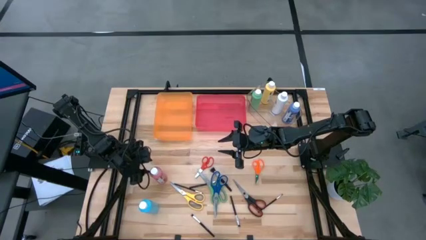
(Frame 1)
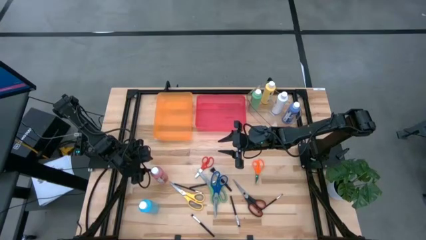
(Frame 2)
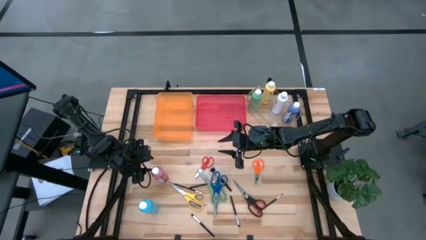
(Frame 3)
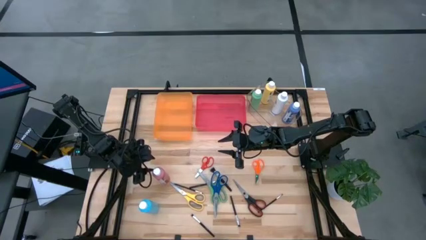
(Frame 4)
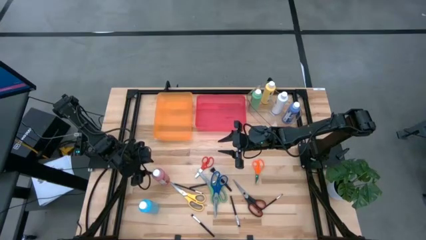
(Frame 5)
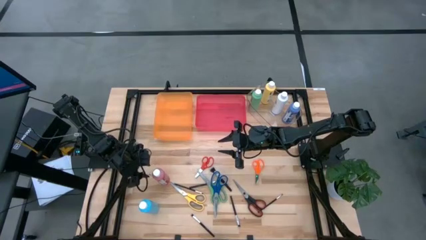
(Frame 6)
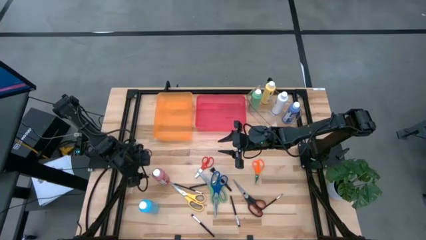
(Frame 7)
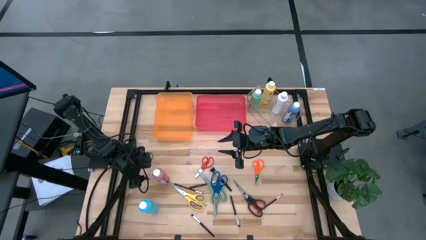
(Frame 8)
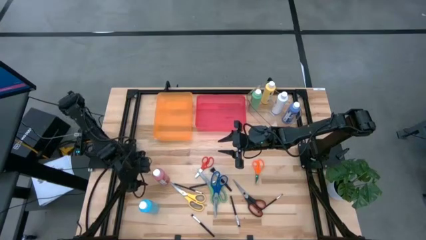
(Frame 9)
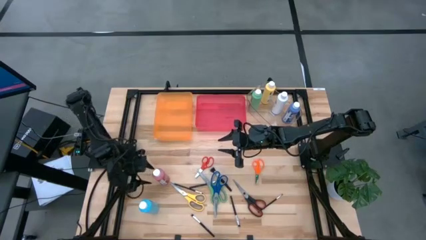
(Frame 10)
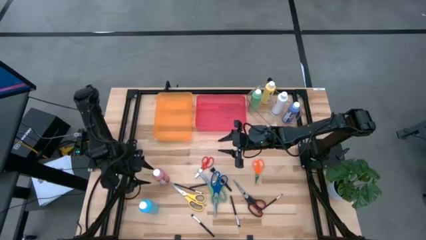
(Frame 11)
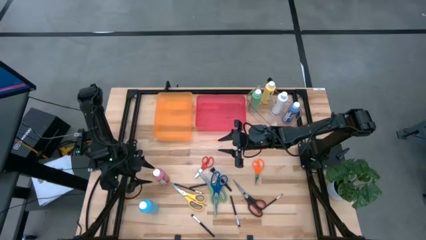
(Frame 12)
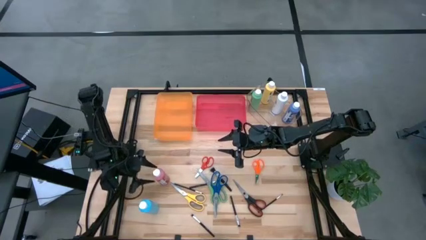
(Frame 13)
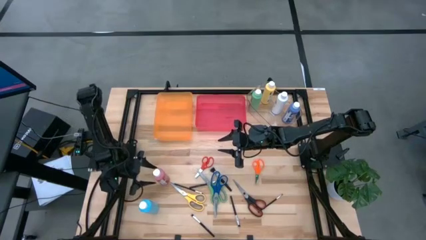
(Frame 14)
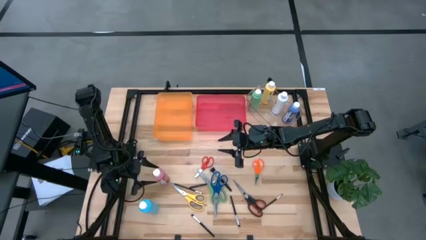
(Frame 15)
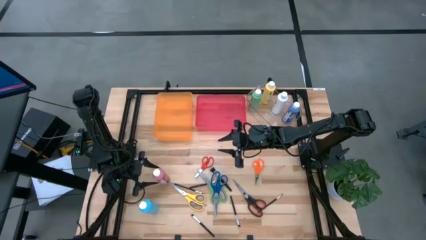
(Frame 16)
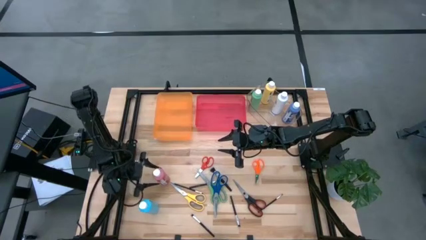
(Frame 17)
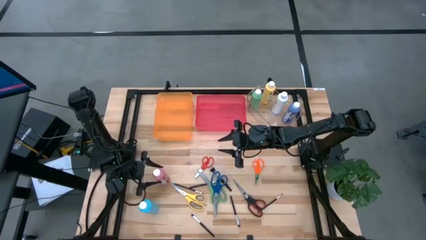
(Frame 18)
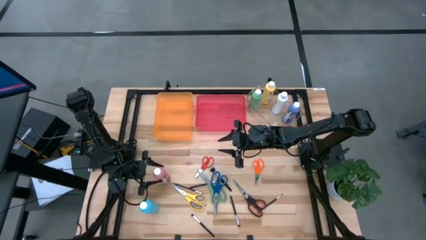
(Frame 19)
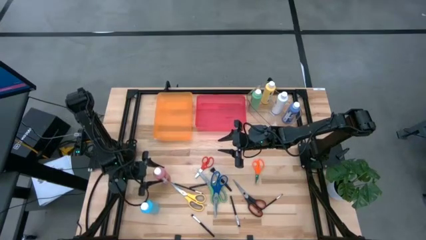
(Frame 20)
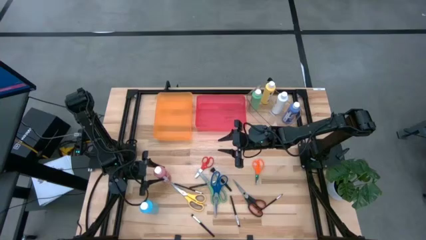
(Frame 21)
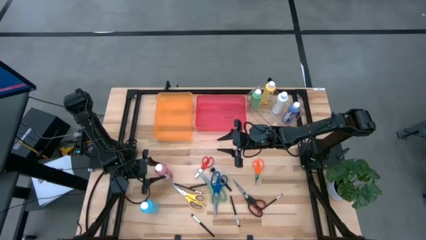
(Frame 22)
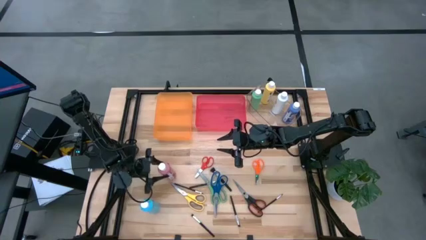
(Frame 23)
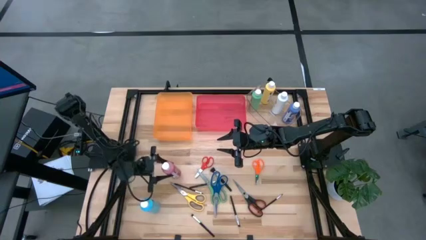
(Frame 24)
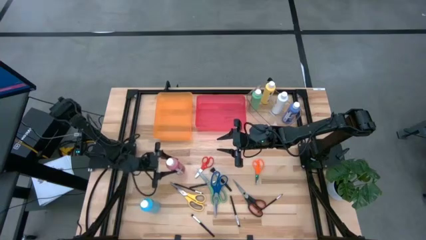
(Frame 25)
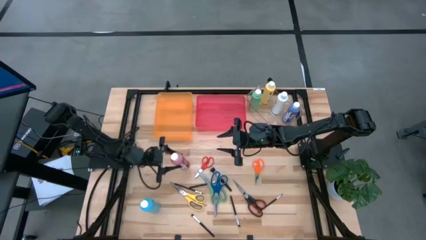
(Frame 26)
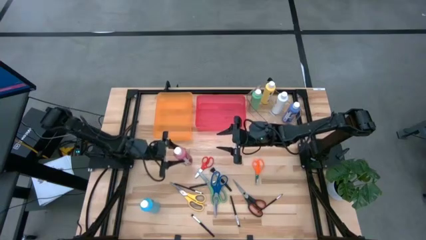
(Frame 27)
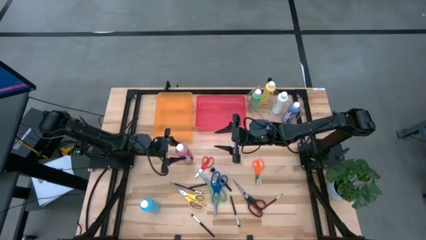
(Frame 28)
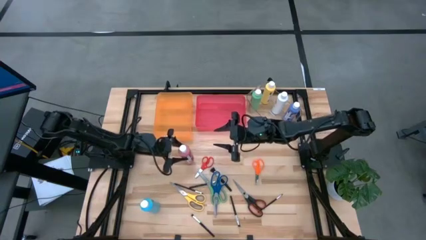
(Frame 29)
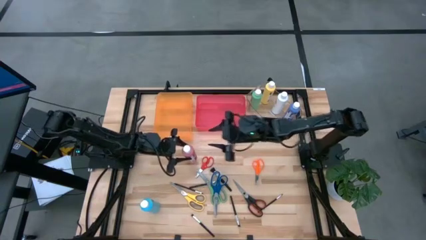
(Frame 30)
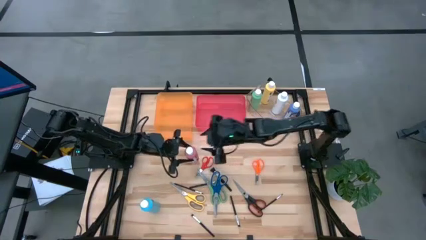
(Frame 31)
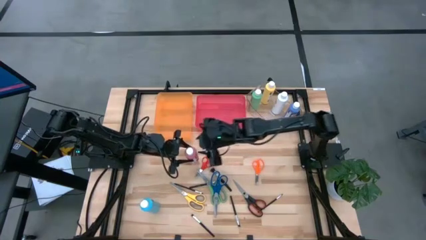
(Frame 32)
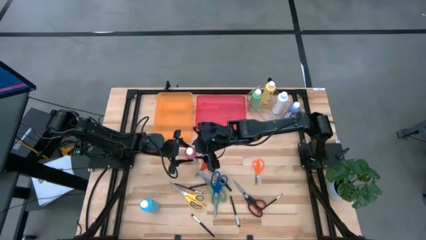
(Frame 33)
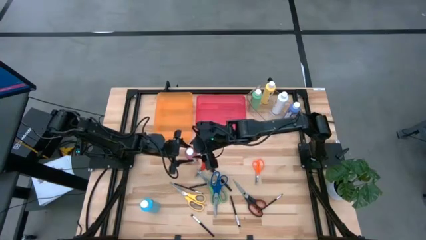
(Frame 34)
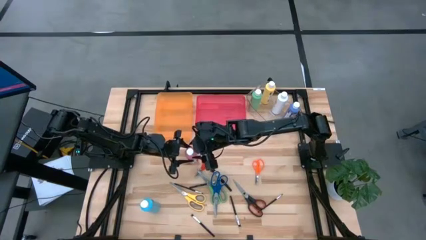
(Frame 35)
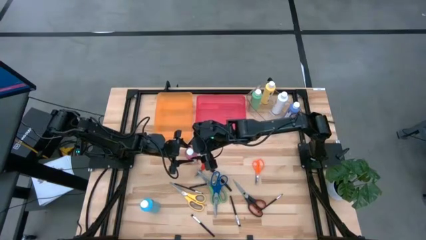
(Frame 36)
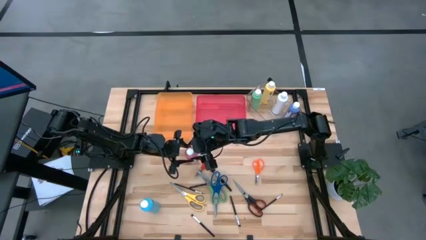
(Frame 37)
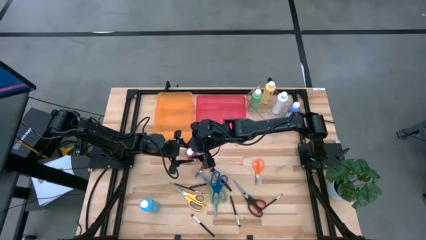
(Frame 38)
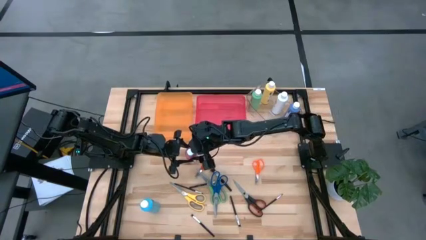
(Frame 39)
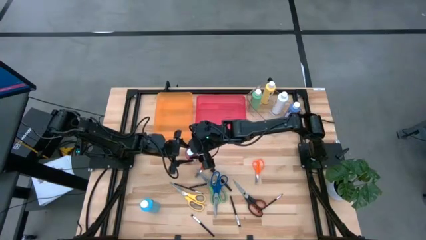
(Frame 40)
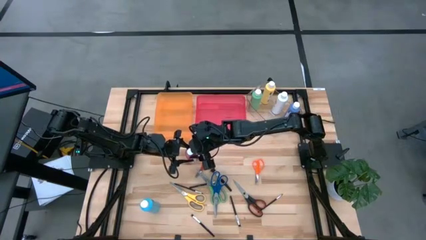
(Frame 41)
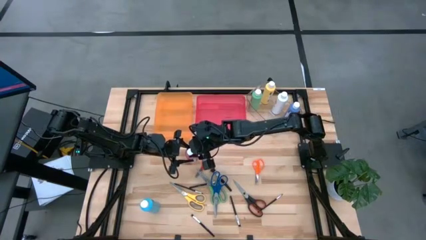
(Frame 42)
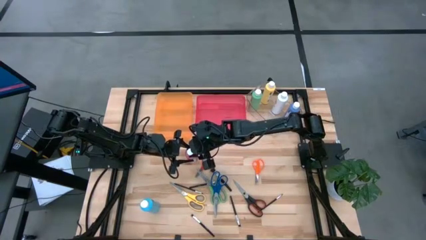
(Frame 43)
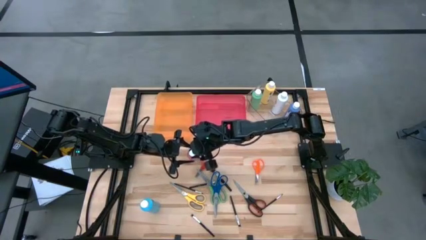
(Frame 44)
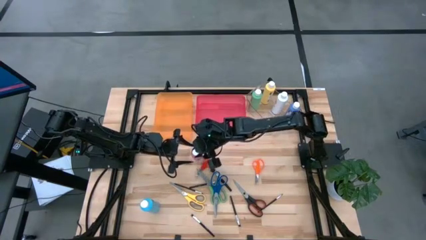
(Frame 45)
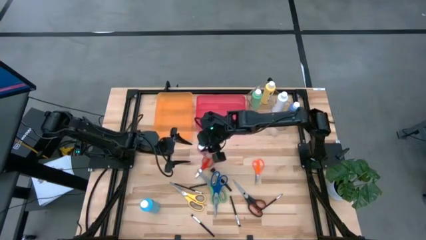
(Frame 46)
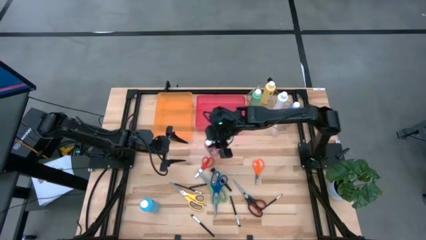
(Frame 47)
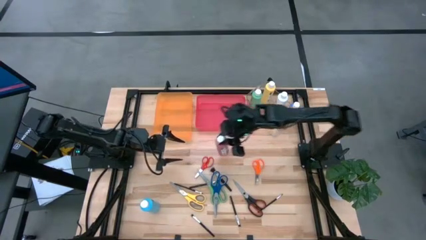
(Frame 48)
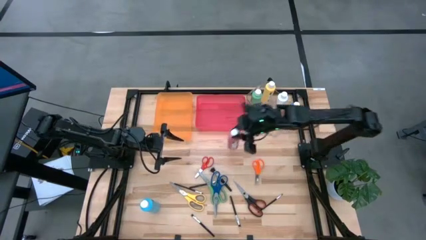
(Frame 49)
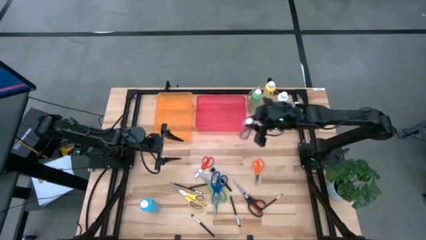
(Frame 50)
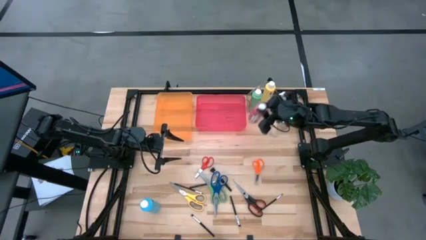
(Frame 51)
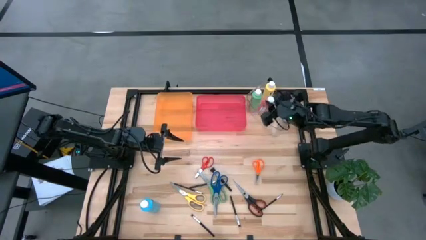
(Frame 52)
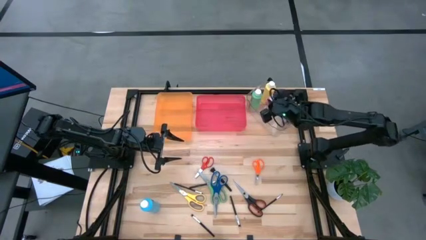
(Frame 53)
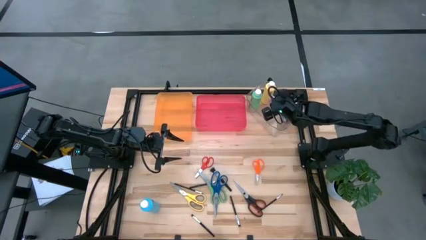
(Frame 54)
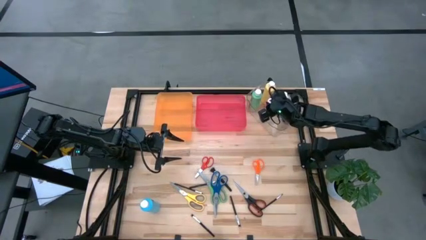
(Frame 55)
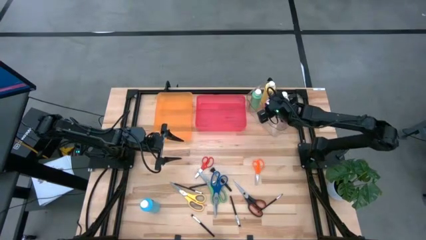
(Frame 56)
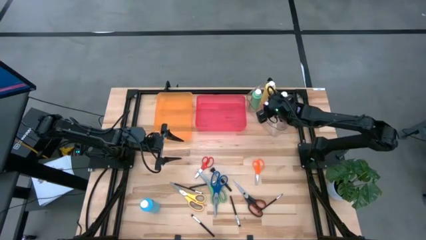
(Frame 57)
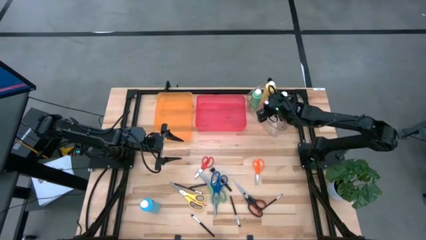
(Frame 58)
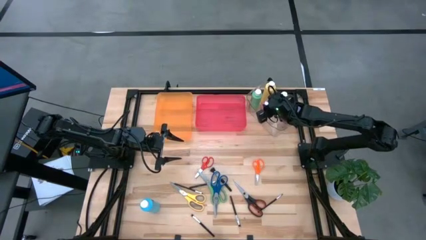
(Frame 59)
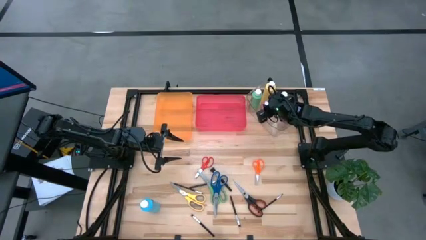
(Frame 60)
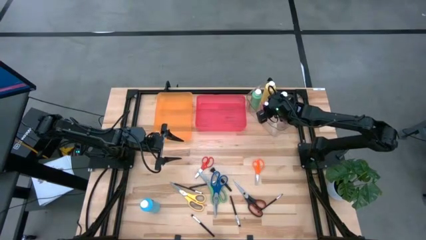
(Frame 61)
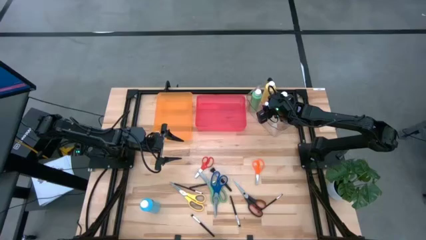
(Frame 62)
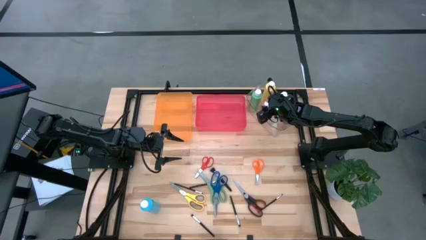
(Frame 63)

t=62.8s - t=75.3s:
Task: Pick & Place Paint Supplies
Put the pink paint bottle into the transparent bin

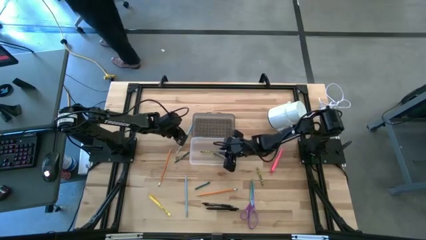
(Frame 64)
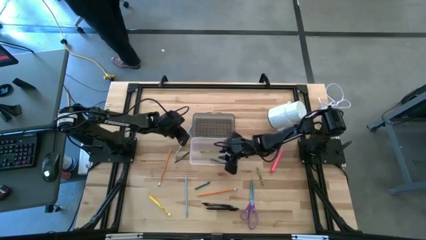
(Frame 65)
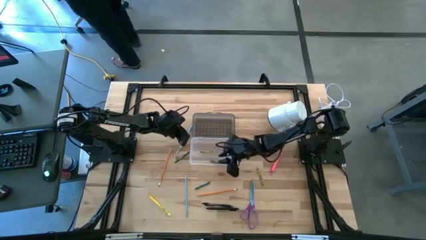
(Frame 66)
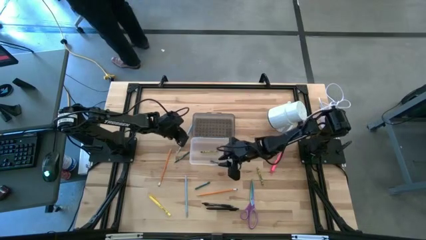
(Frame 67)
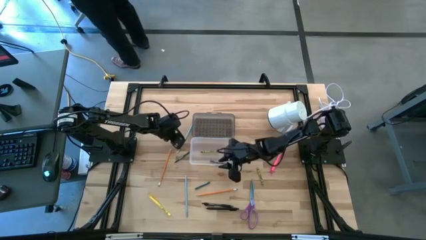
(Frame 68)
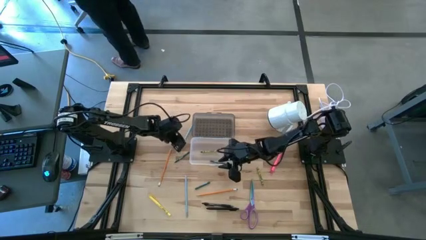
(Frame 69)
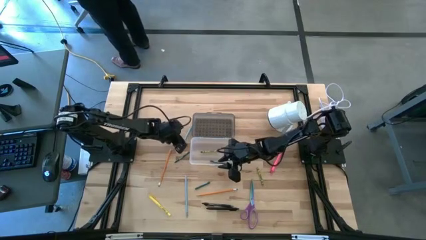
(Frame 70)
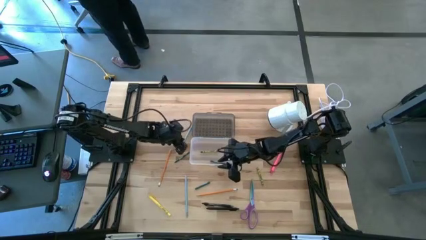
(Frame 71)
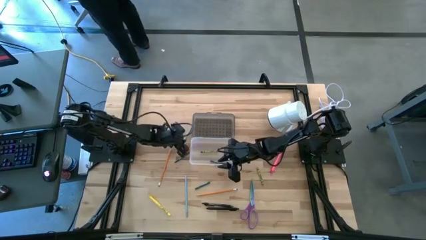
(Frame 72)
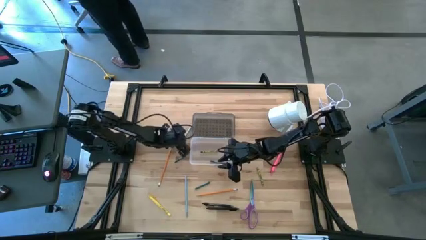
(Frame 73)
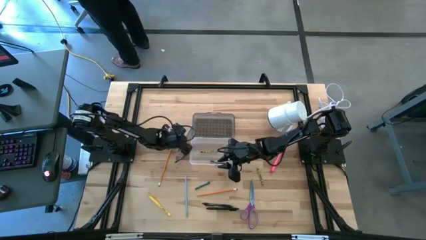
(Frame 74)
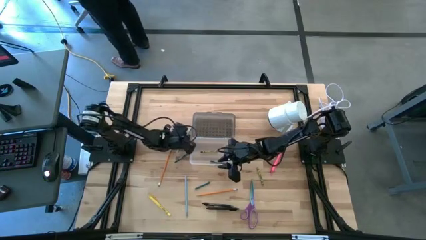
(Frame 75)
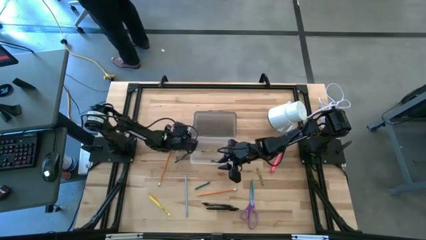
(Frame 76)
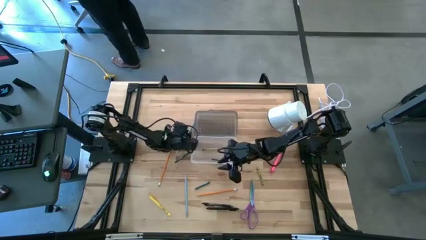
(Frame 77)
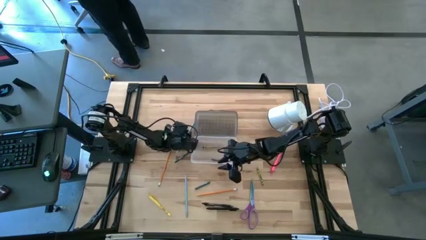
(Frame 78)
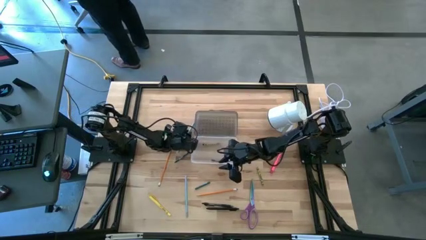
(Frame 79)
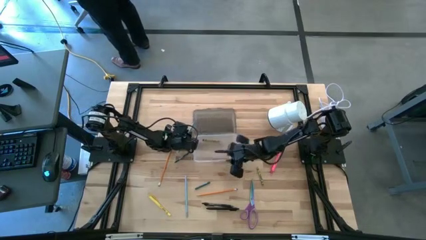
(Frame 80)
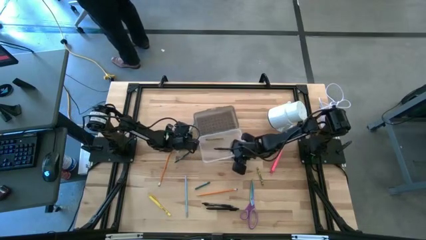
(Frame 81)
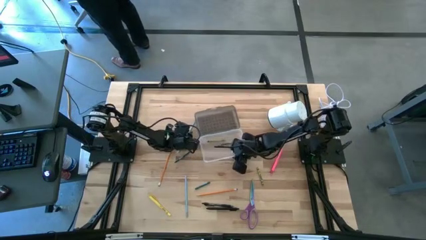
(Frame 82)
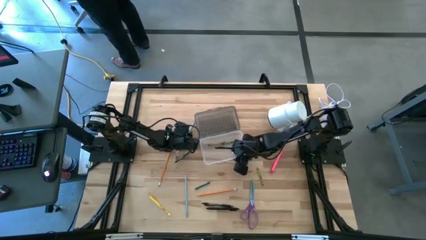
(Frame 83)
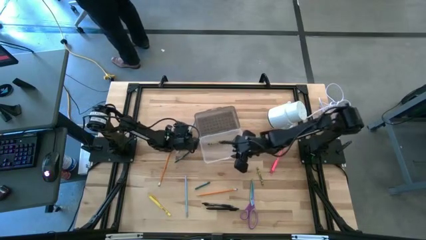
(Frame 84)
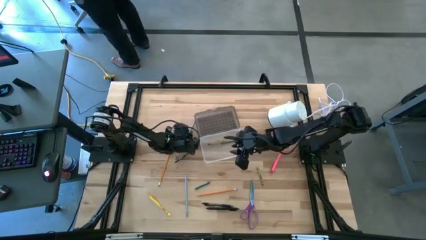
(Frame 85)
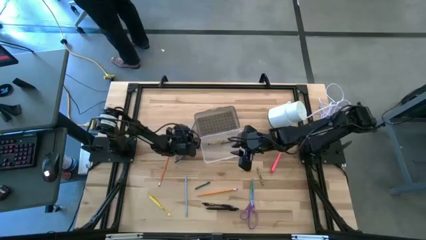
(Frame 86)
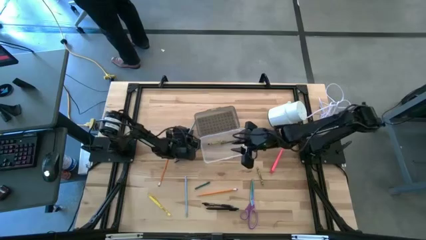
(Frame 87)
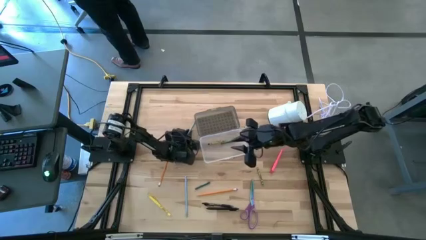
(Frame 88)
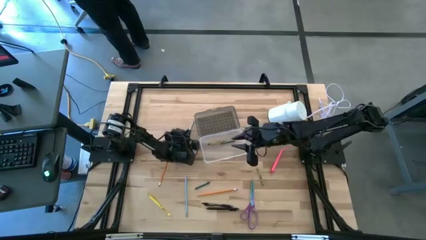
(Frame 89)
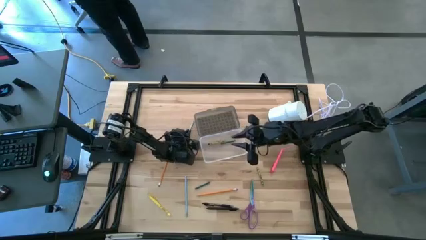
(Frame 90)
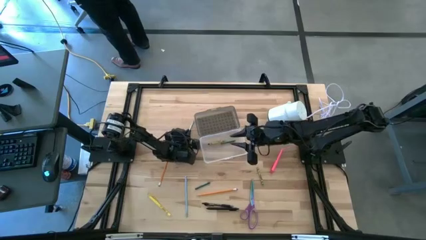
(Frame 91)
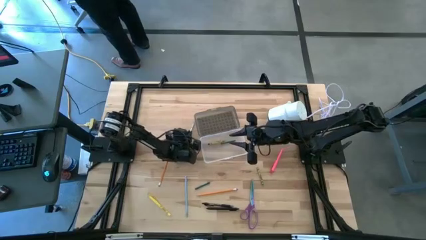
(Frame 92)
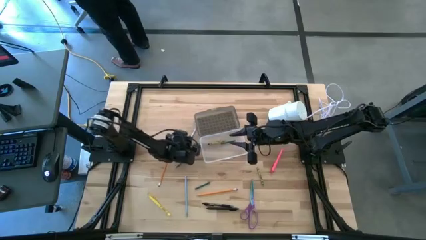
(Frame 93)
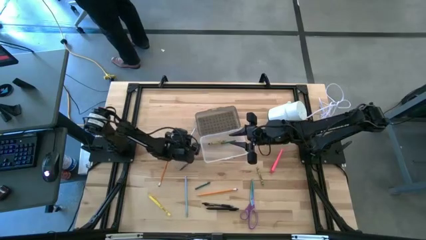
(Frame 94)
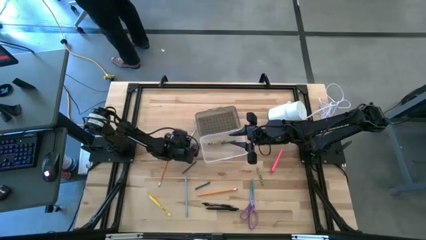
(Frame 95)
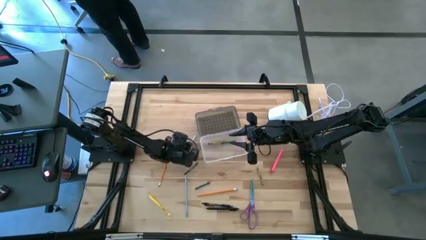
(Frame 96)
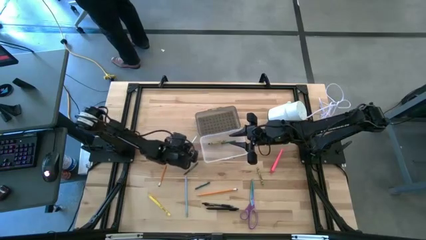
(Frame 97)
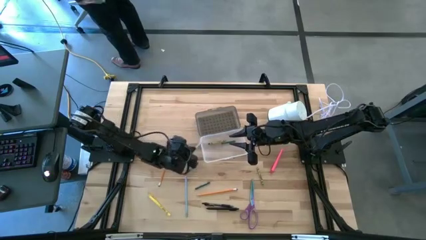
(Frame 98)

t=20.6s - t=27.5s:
Task: Pick & place school supplies into a supply box
Put the light blue pencil into the gray supply box
